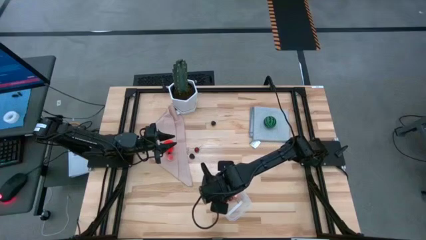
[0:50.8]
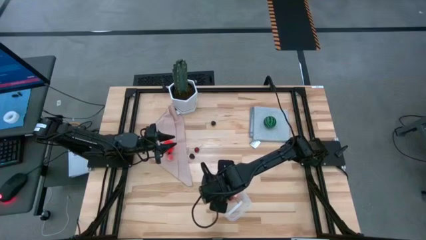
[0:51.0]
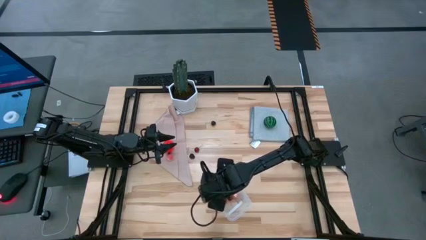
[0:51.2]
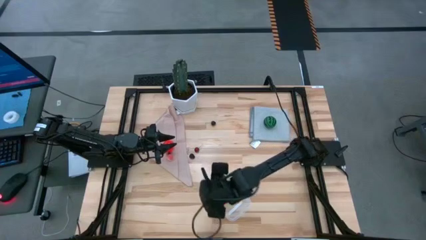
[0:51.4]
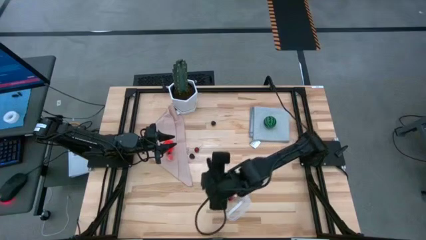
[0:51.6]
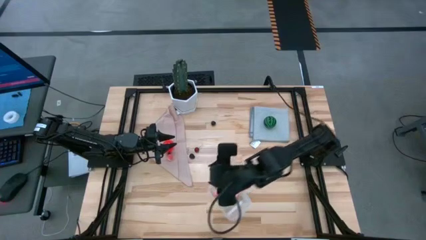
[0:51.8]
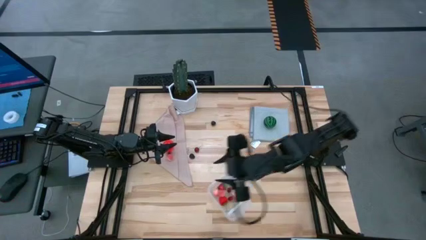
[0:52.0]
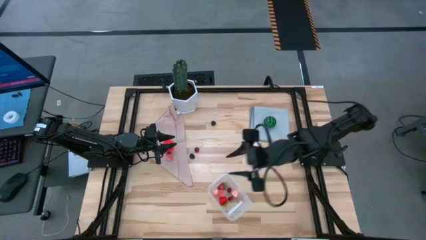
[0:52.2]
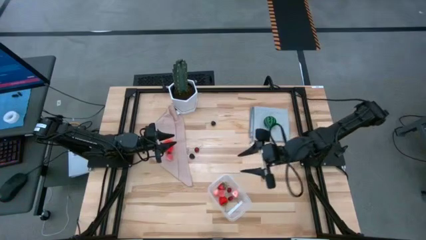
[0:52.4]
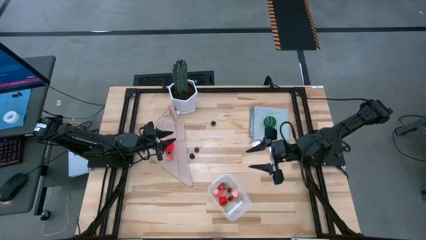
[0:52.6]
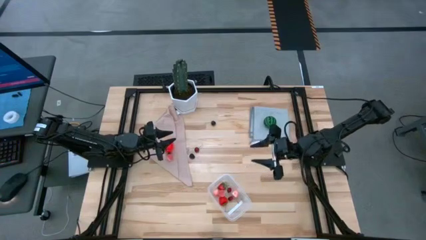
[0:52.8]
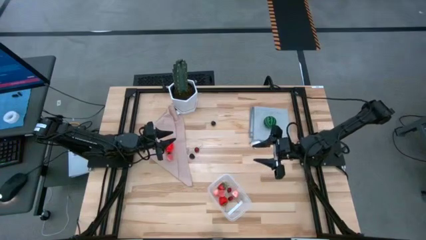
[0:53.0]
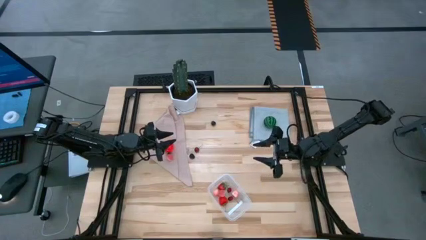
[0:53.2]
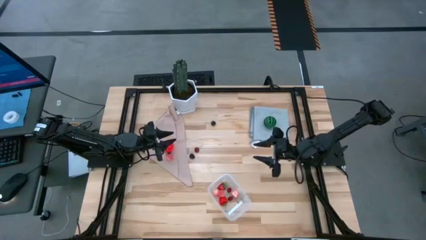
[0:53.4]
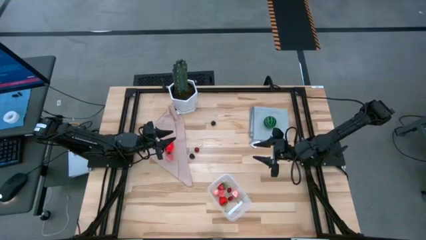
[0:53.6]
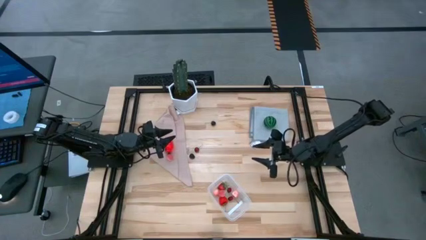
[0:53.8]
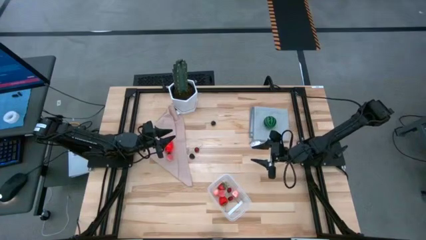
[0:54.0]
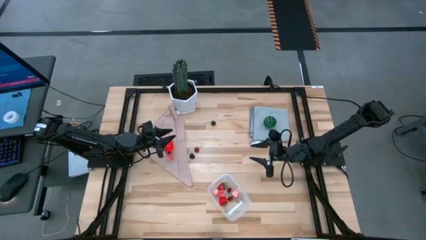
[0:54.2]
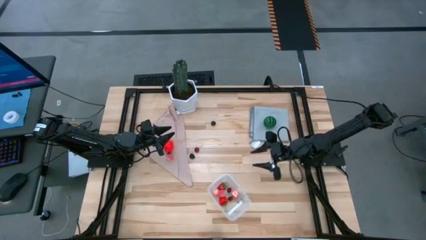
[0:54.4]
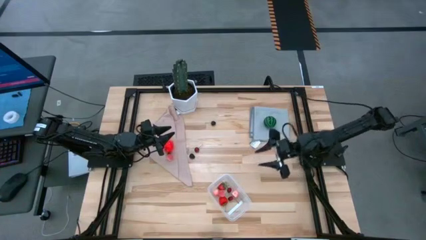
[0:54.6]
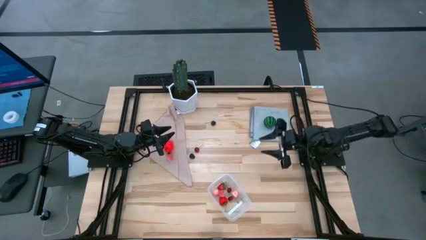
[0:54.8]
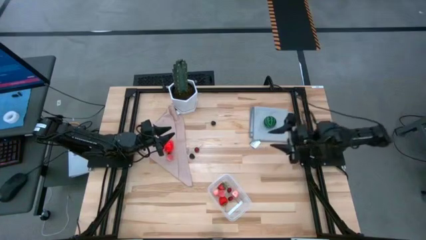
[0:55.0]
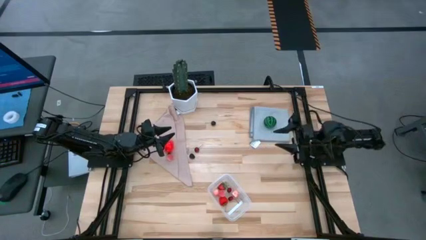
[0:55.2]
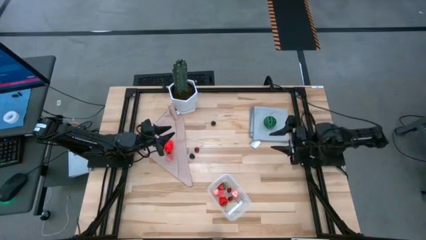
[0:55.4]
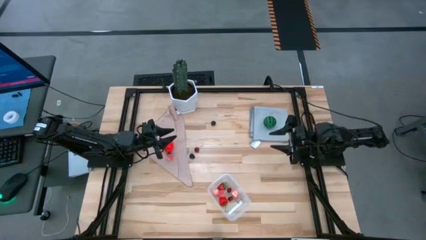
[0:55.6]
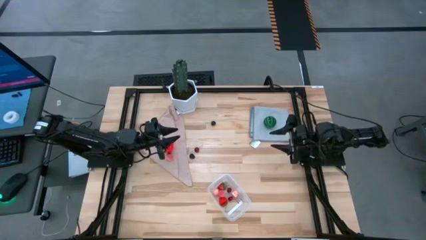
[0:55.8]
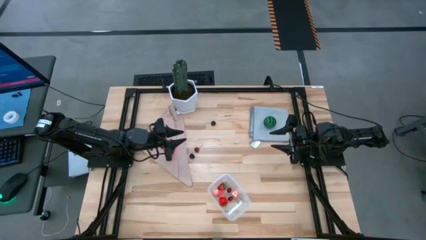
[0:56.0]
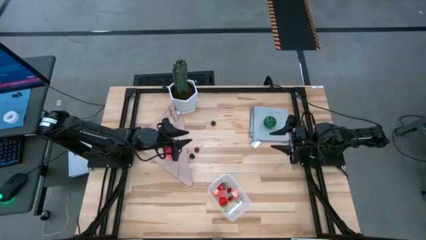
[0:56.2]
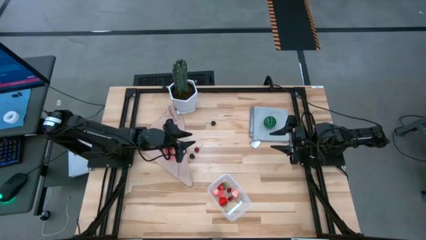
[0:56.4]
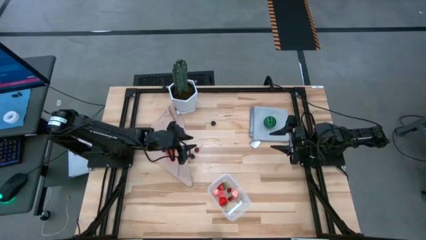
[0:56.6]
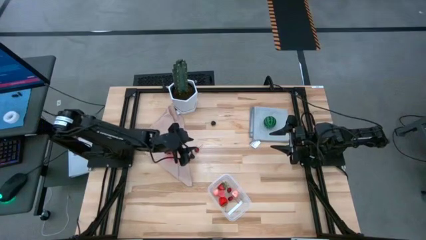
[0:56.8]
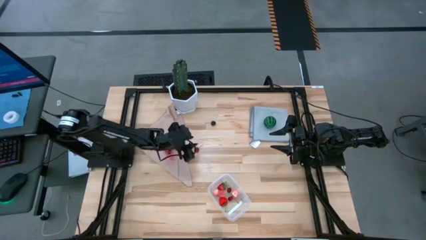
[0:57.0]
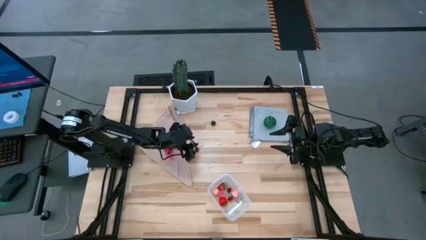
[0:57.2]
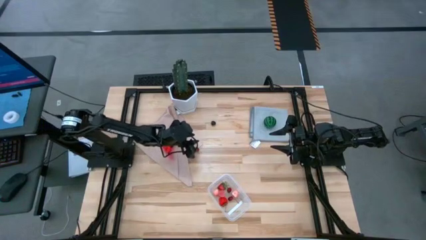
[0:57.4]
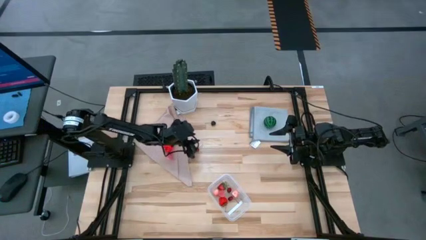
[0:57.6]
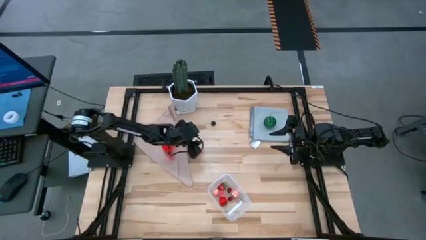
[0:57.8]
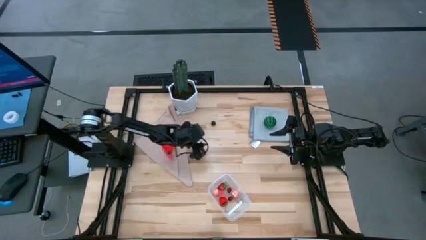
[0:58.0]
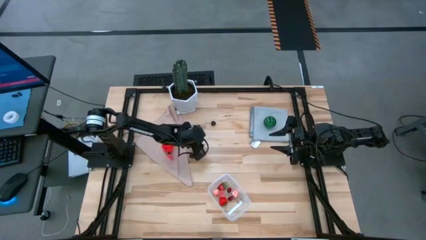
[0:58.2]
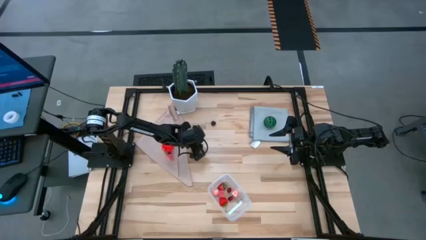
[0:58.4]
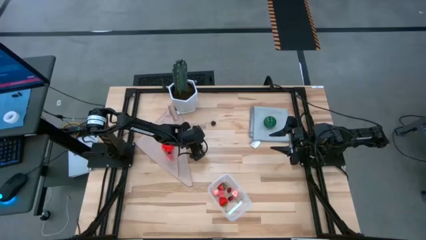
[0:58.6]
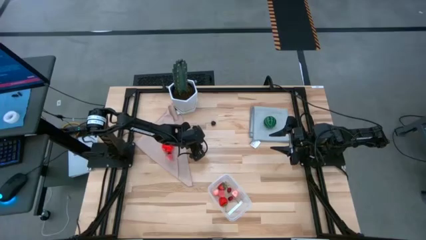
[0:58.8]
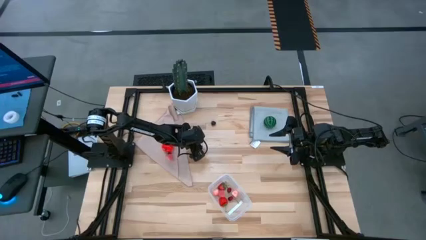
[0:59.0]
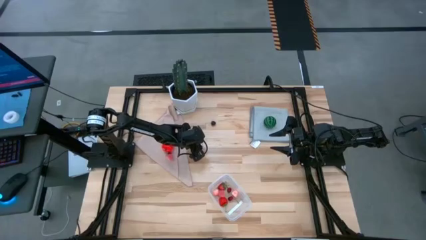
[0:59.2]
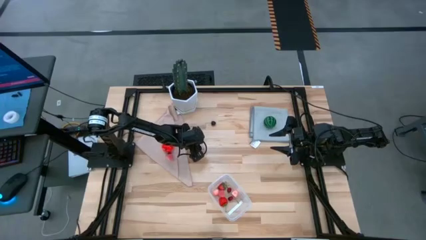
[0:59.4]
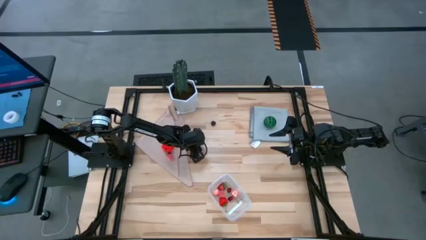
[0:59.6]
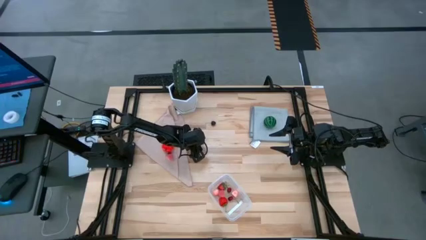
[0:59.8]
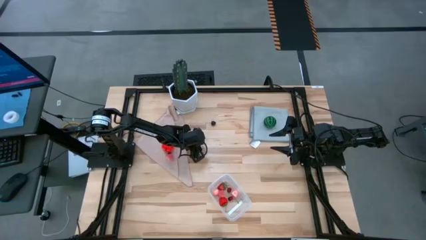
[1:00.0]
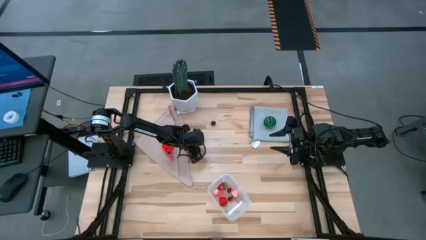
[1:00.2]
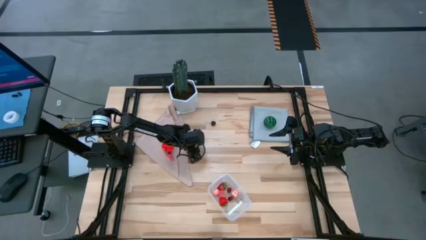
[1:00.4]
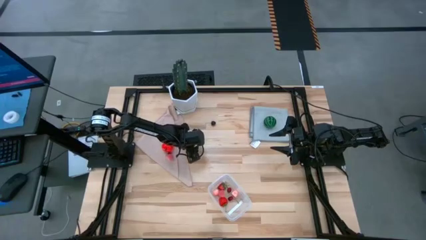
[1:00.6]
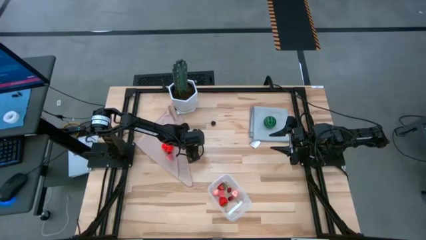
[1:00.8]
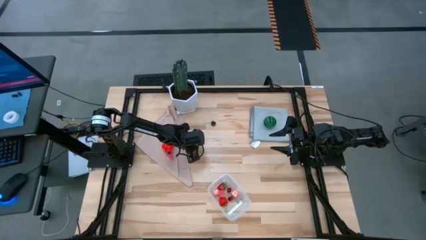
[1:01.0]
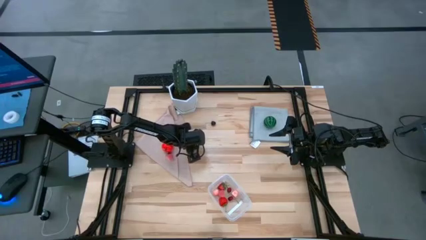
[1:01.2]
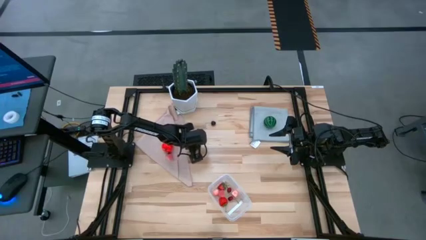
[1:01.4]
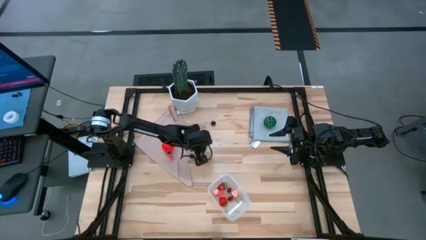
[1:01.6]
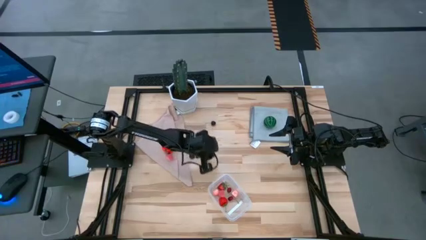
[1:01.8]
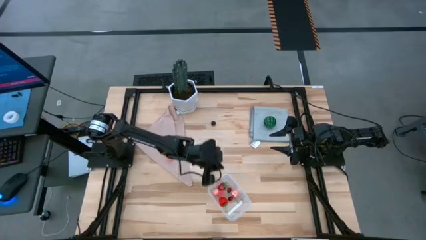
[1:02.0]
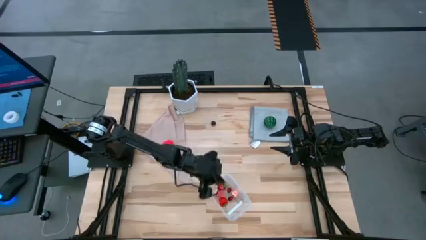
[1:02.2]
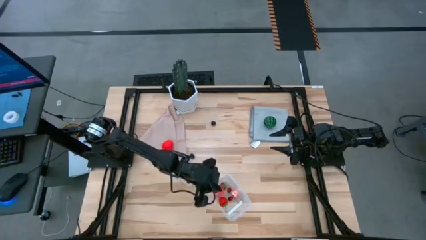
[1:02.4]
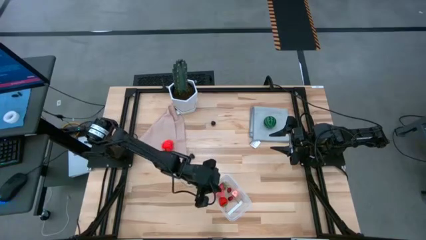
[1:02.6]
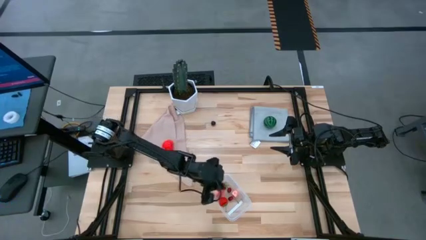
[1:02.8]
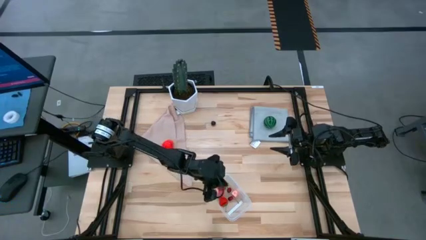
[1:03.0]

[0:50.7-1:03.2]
Task: Pick and placing Produce into tupperware
Put the red cherry into the transparent bin
